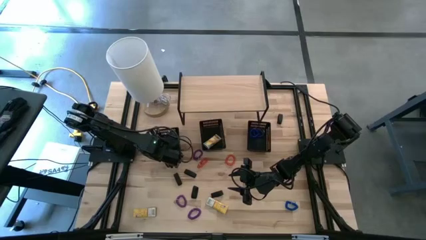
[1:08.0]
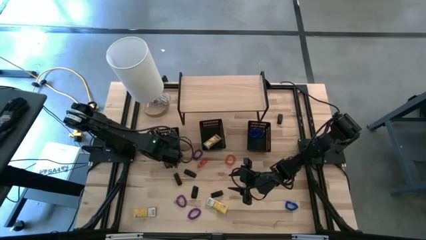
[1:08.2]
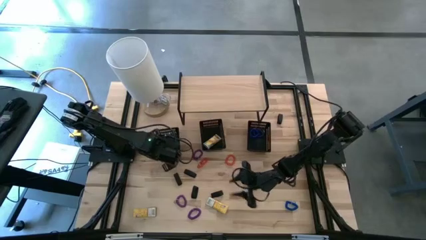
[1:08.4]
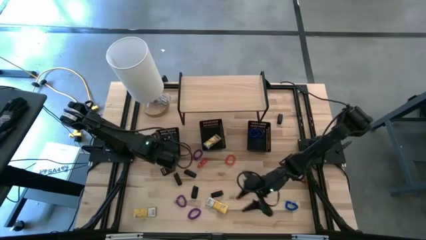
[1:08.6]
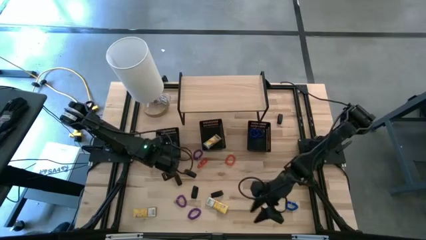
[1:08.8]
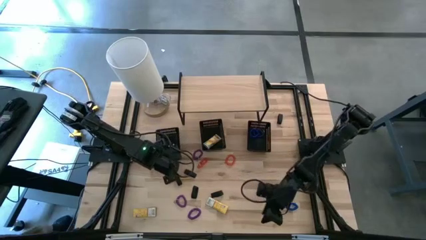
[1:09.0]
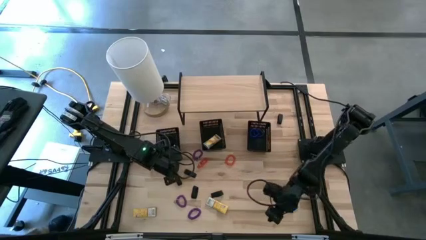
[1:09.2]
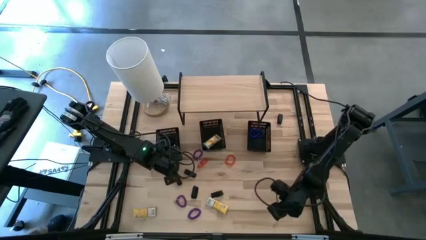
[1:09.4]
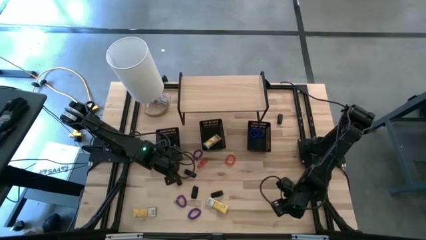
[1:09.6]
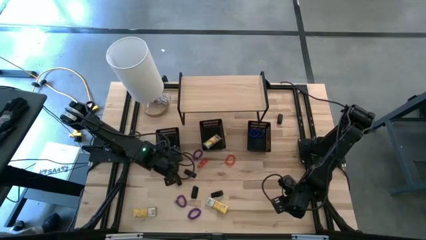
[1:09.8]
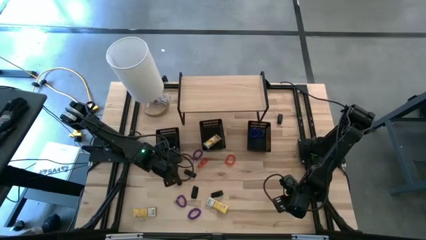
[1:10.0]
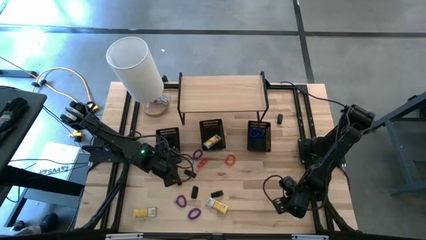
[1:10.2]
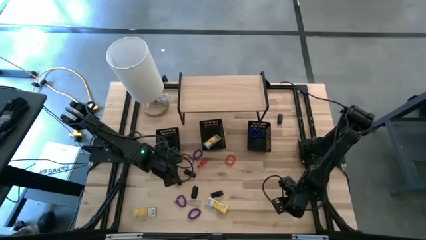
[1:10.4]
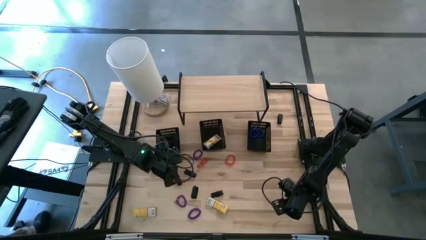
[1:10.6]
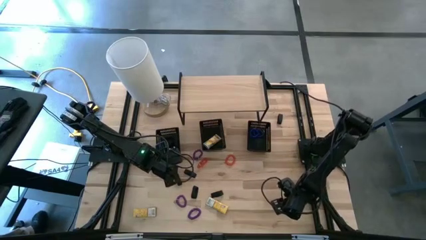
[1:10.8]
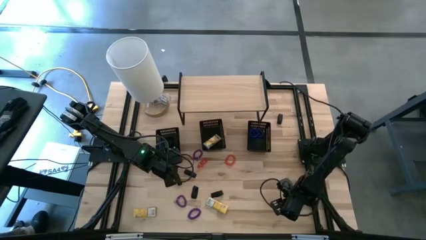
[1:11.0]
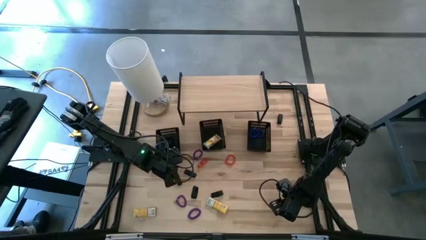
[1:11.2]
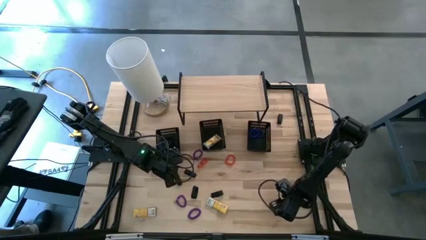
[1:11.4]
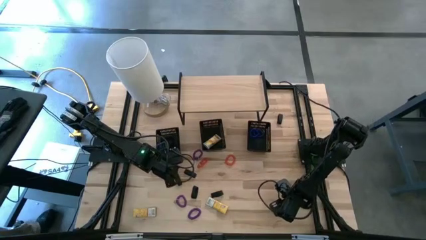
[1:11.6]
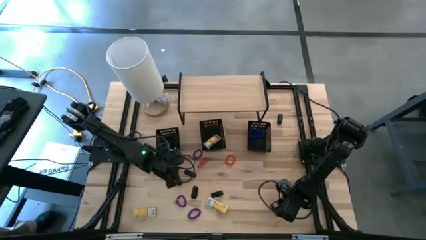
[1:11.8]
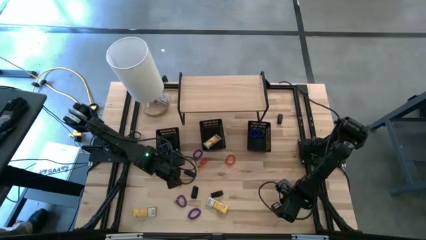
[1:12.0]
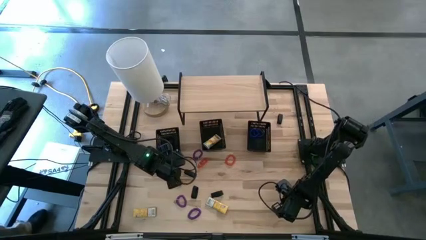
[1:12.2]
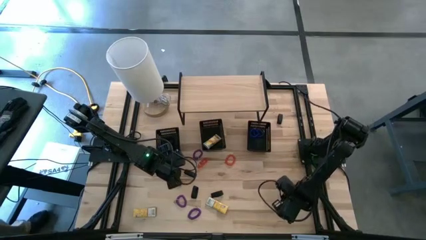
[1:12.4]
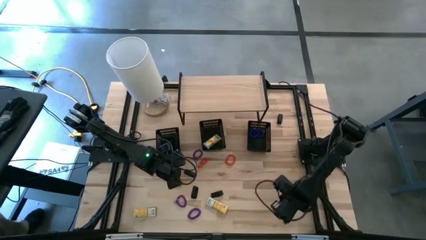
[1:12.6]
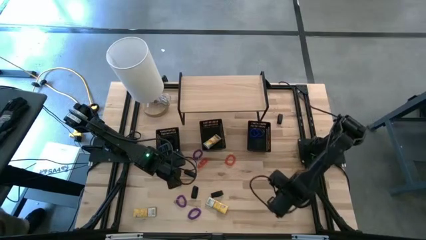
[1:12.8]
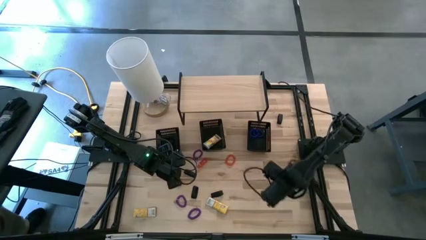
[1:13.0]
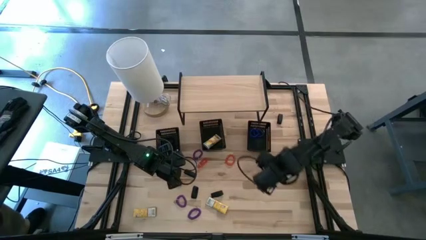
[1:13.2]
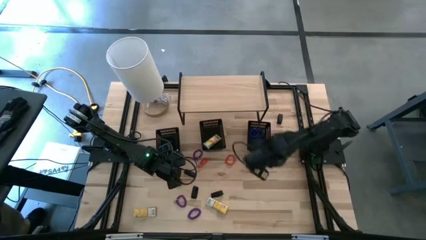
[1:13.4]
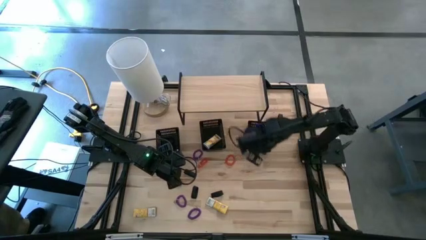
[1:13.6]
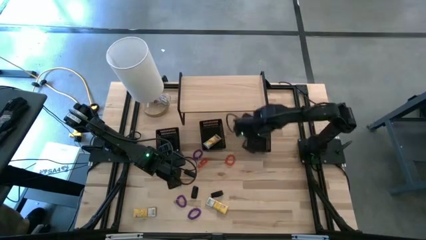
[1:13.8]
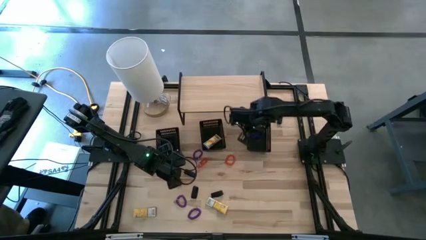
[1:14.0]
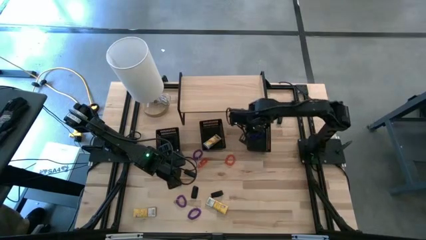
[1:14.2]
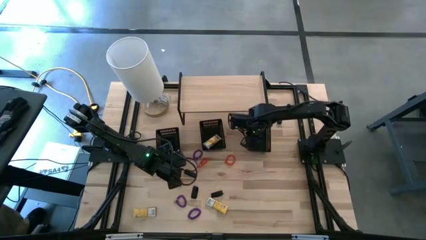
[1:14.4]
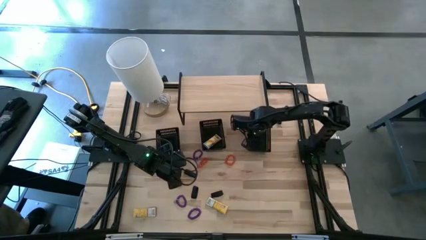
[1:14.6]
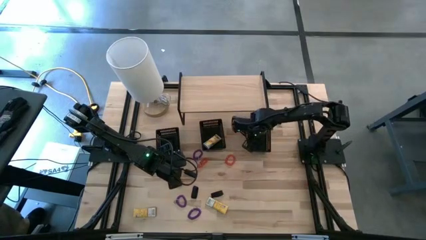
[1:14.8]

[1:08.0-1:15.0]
Task: Pick & Place Office Desk Supplies
Put the blue spring keychain into the right black bin

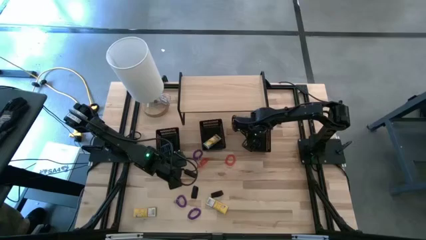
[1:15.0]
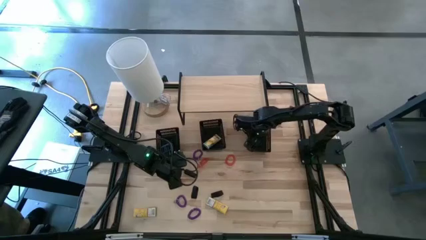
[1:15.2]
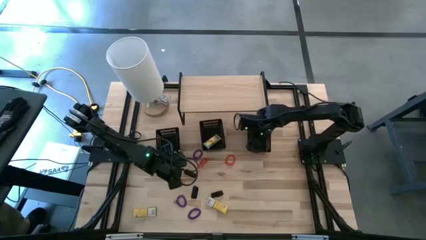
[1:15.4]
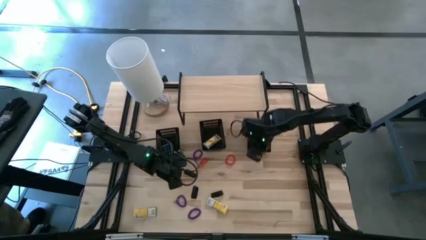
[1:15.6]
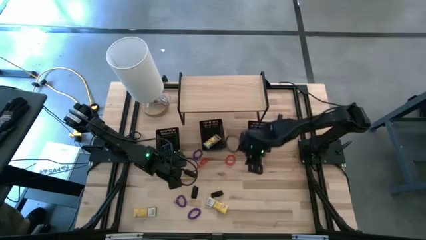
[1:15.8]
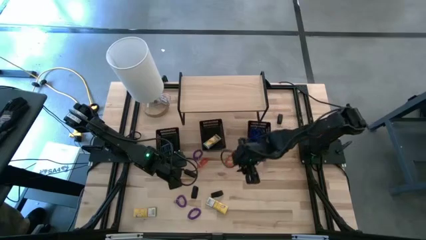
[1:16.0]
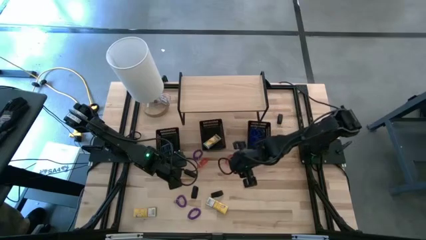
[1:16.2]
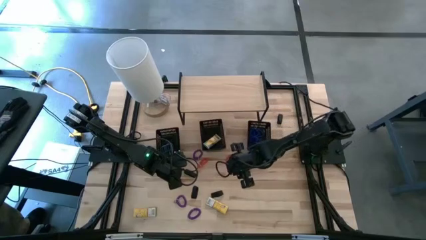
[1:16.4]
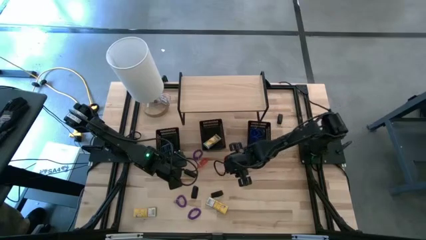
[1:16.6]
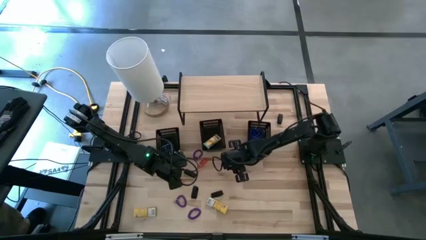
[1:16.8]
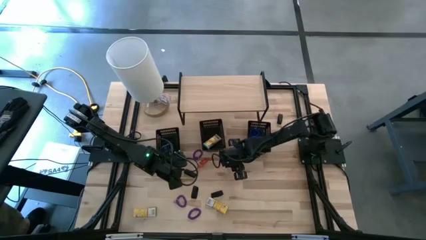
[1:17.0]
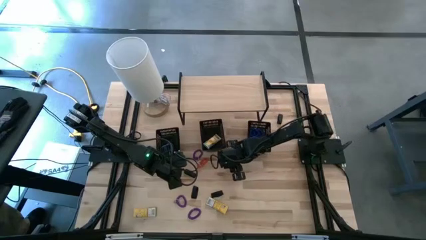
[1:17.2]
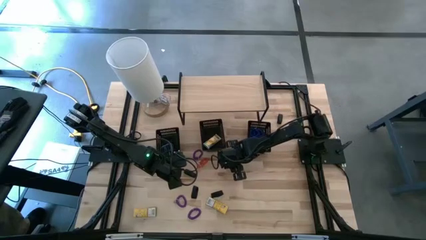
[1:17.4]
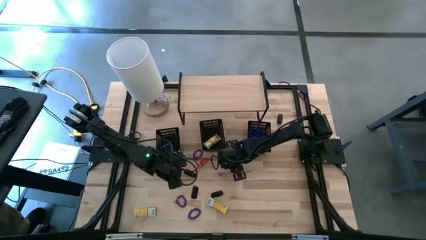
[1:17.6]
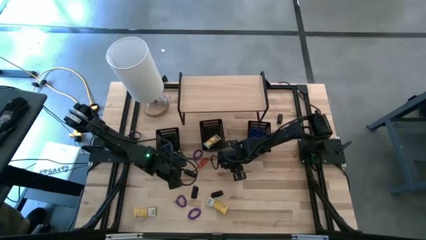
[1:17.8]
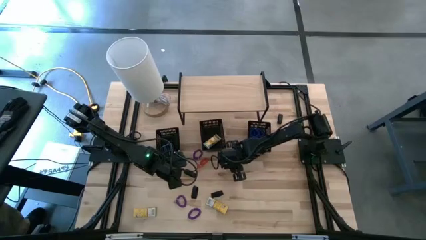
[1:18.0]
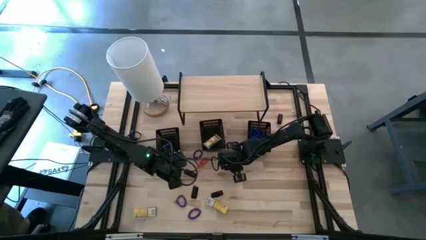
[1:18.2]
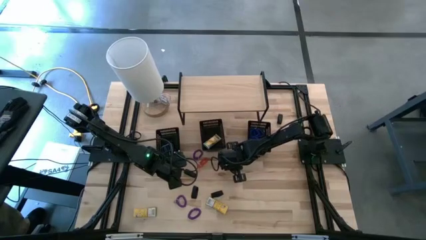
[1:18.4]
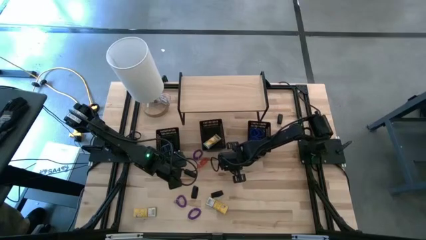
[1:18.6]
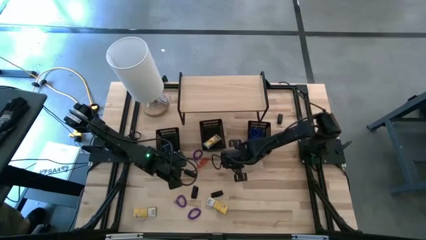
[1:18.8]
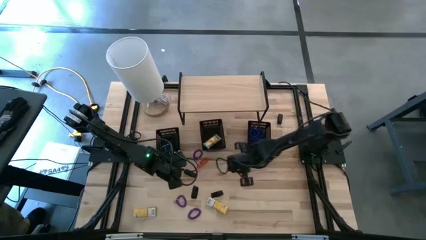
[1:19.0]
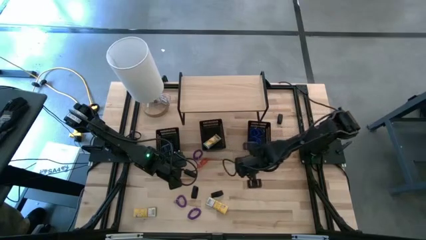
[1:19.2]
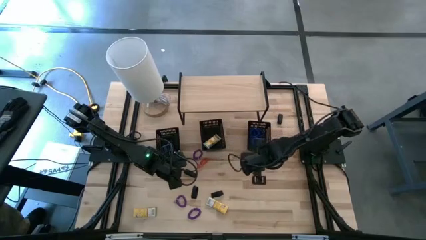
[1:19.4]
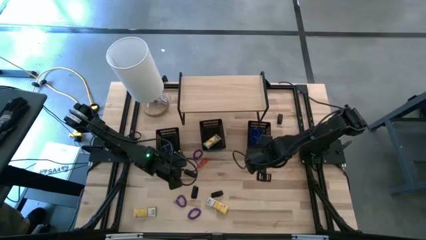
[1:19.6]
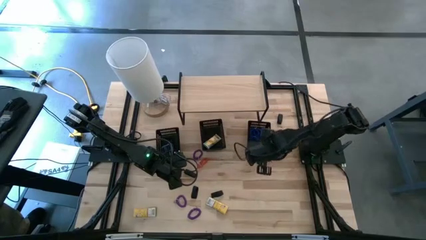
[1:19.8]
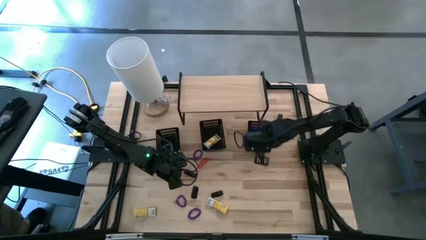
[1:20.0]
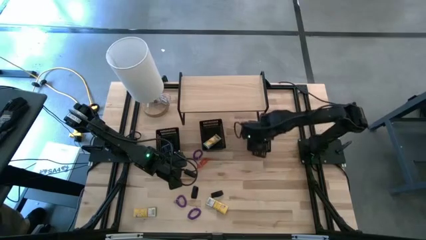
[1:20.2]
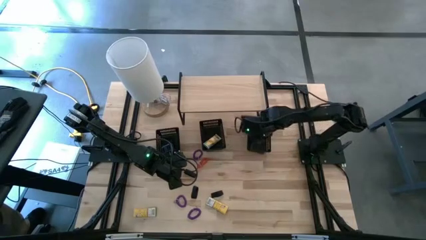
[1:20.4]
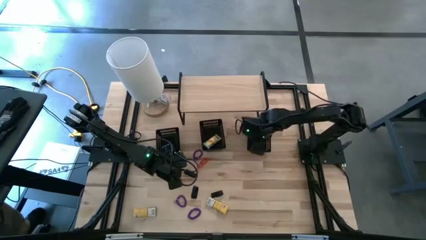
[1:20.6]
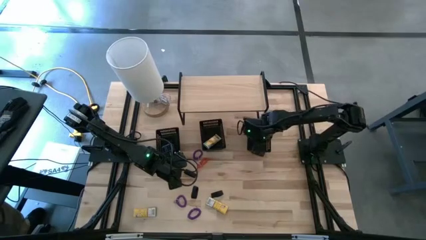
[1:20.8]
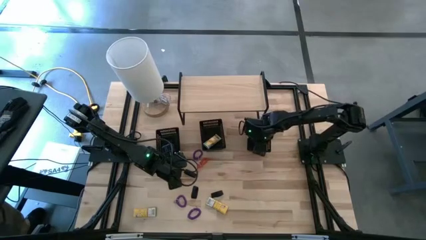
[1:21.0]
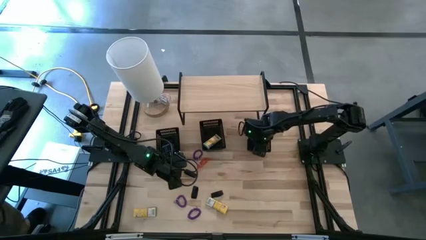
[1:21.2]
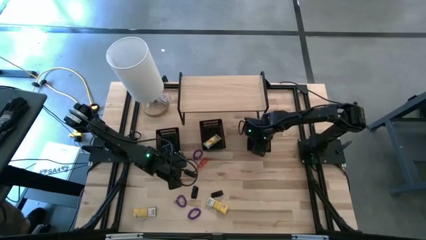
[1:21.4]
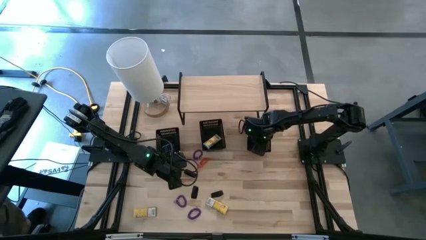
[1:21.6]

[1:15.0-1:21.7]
Put the orange spring keychain into the right black bin

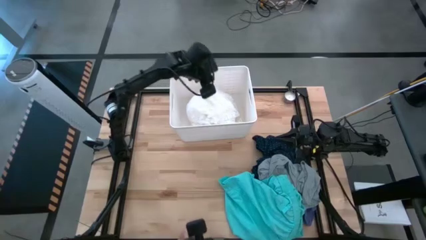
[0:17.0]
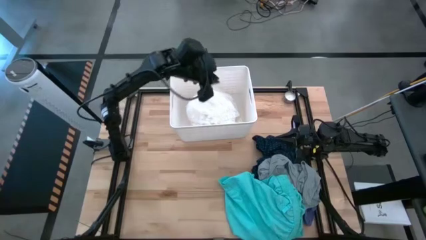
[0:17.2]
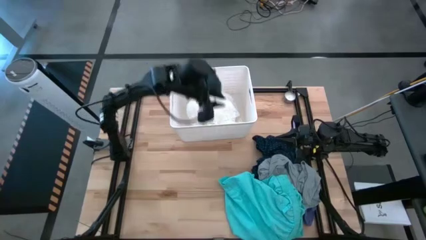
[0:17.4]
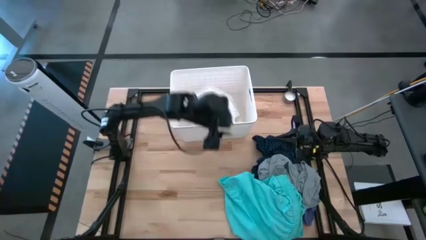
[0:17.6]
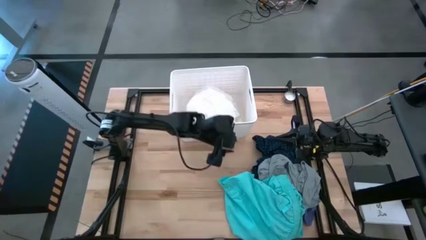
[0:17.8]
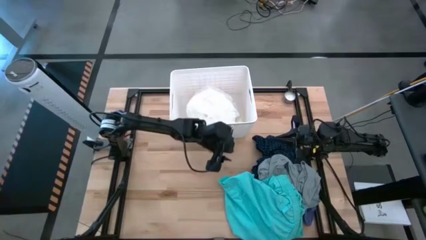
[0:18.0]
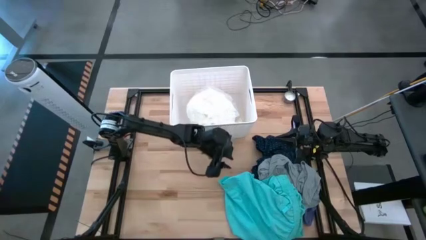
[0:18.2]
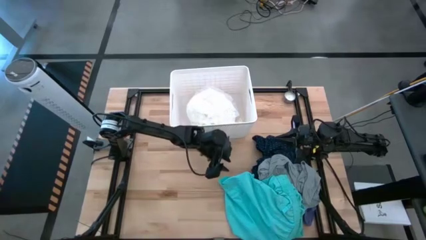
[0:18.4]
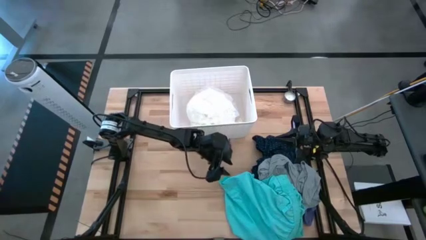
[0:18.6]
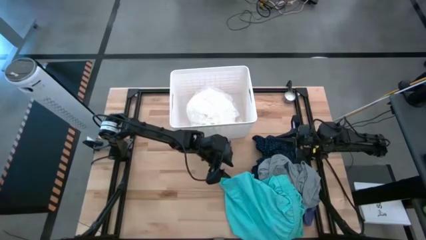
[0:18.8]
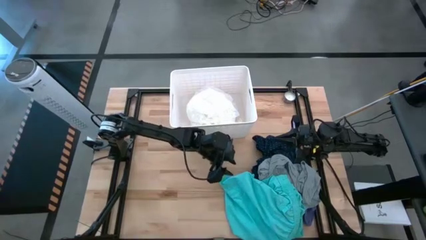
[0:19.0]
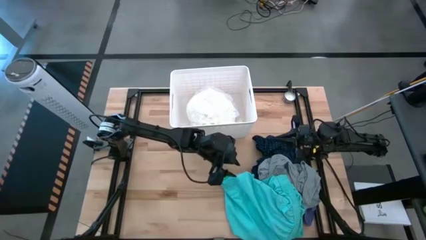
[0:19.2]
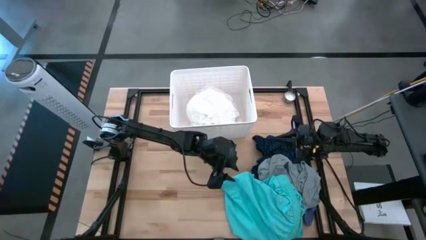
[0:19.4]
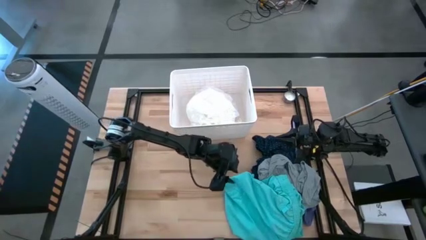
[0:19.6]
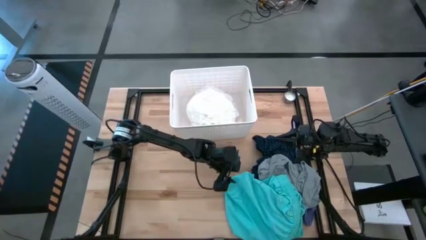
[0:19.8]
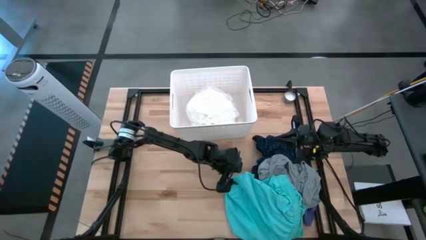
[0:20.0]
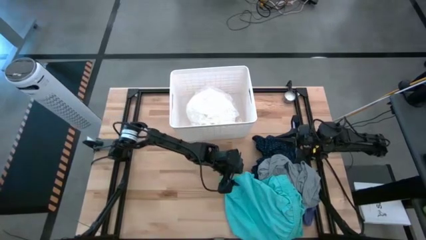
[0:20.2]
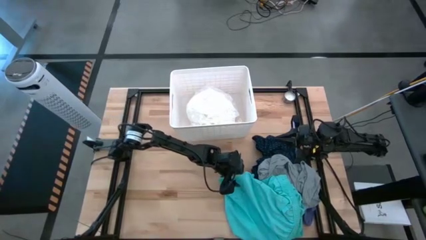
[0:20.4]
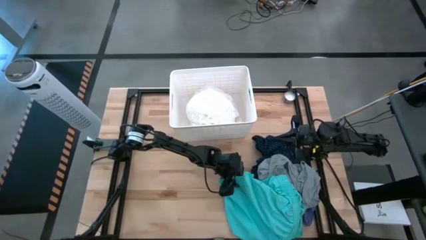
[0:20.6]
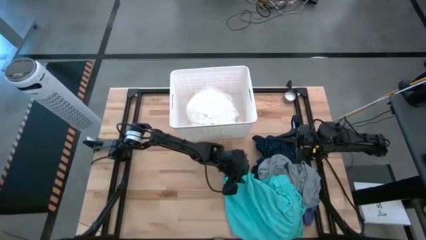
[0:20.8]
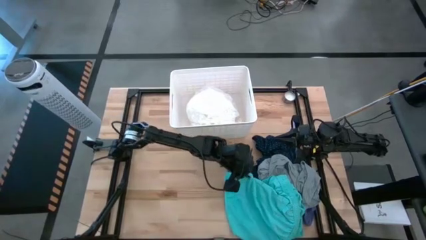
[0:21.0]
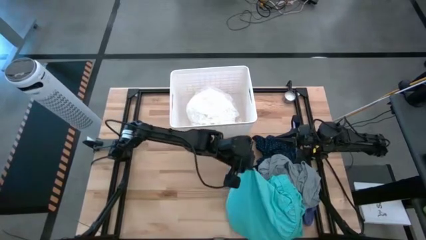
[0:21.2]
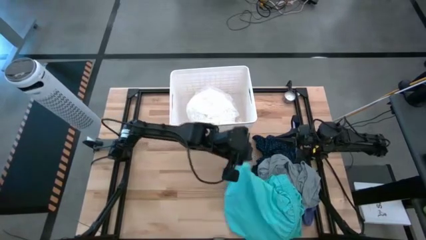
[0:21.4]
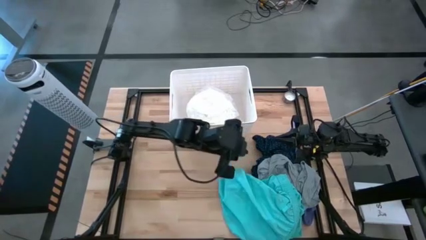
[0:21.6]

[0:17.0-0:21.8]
Task: Sort clothes
Move the light blue shorts to the middle left of the table
